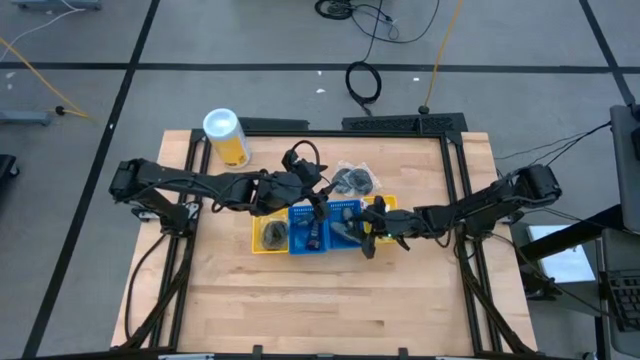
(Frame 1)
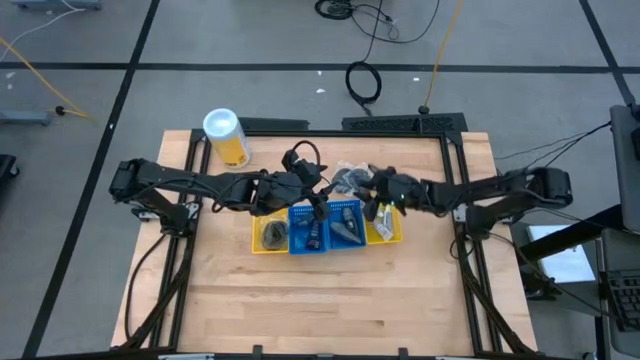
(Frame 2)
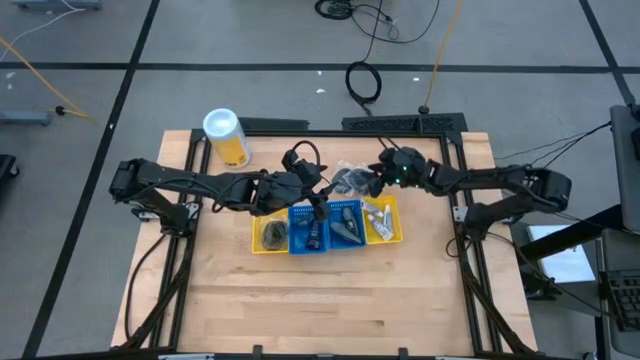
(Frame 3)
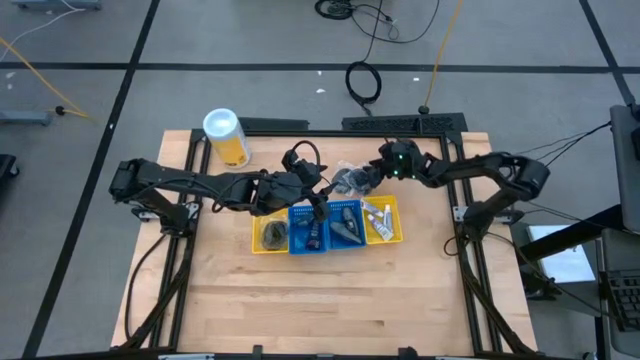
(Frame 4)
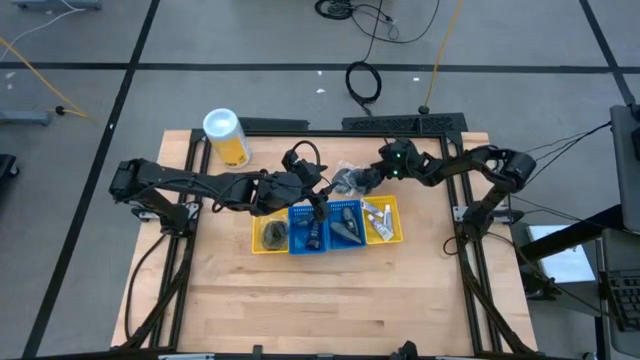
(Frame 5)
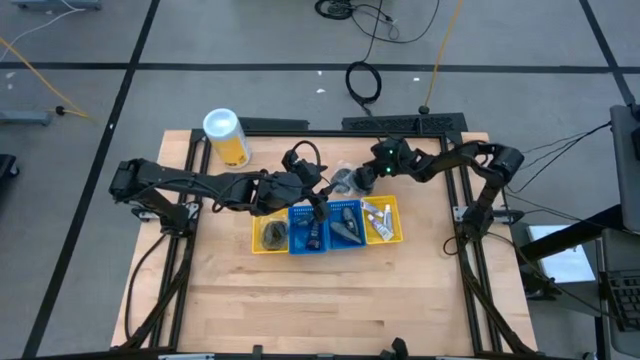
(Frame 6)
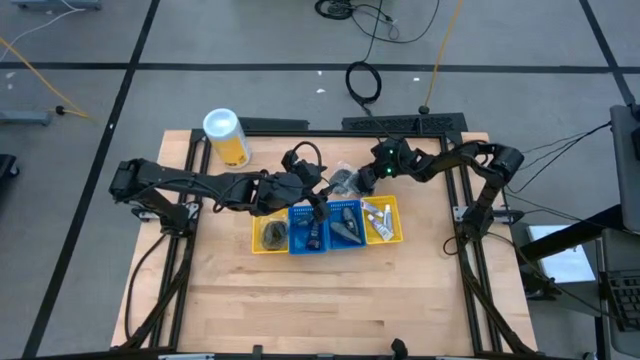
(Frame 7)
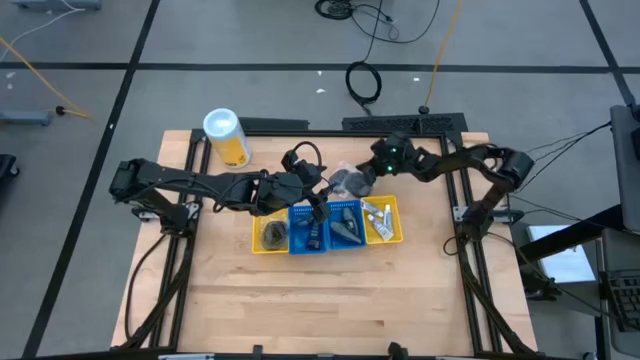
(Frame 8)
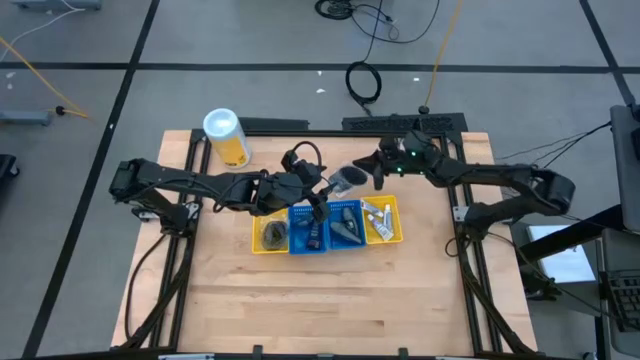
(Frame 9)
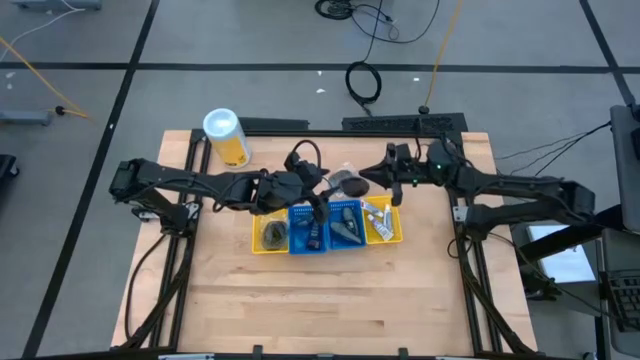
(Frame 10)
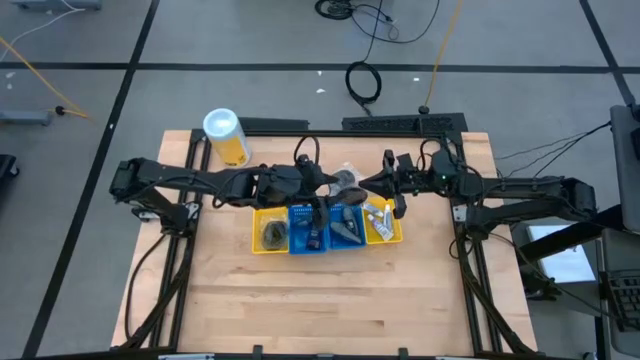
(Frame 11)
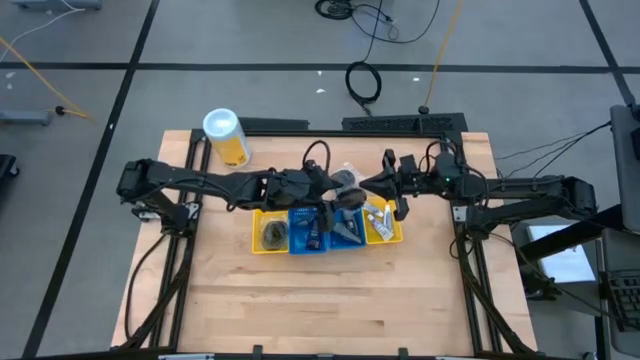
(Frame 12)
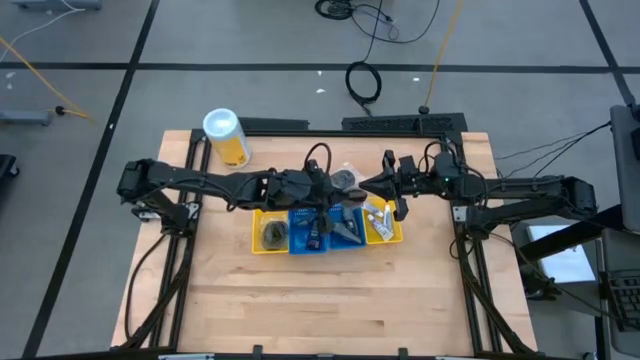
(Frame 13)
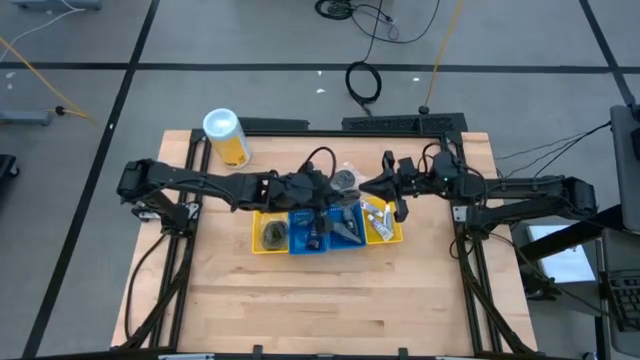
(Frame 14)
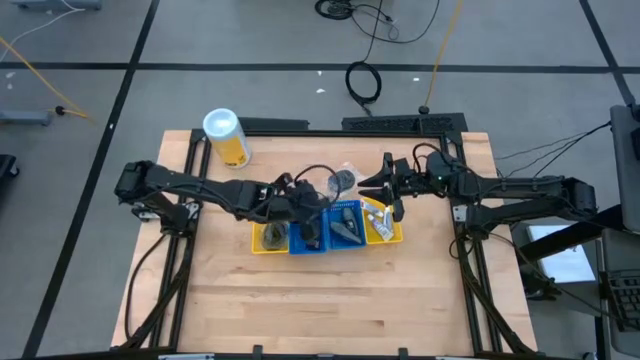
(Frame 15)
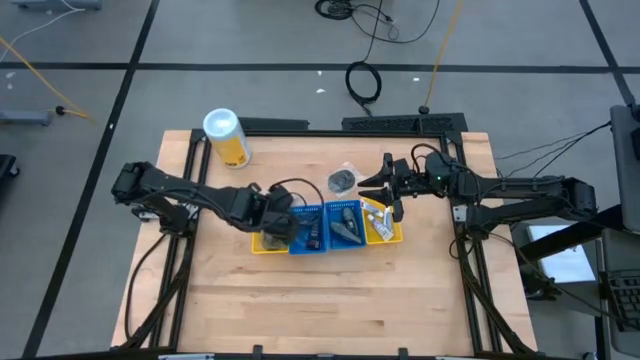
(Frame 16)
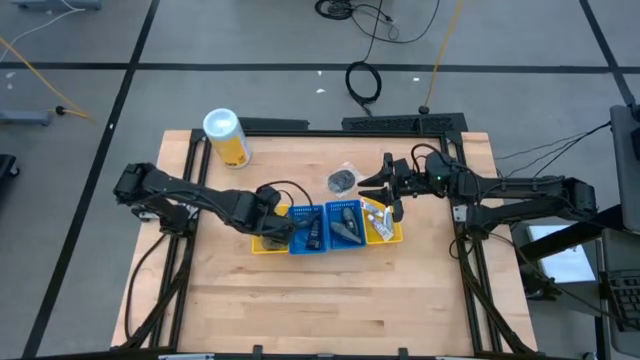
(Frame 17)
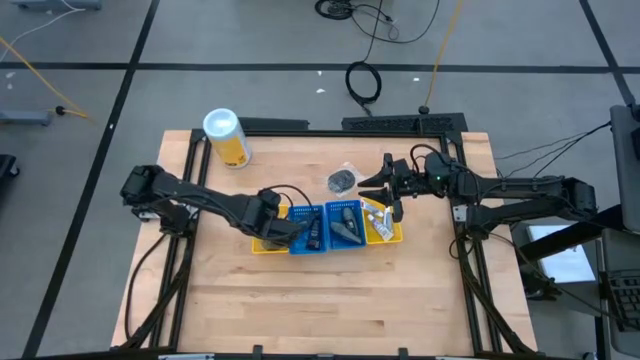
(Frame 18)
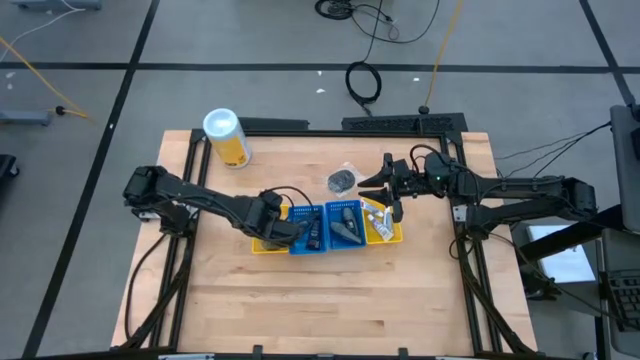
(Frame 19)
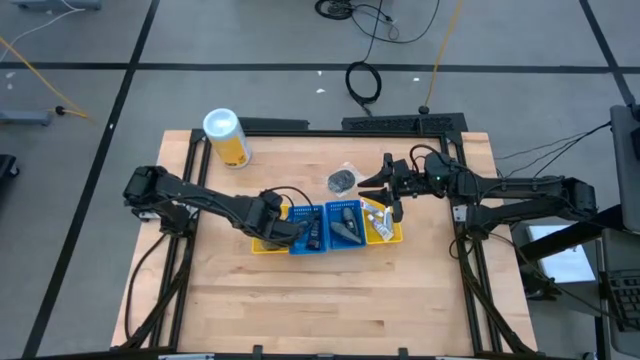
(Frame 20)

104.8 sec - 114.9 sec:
Task: Pick & Place Travel size toiletries
Put the hairbrush into the left yellow bin

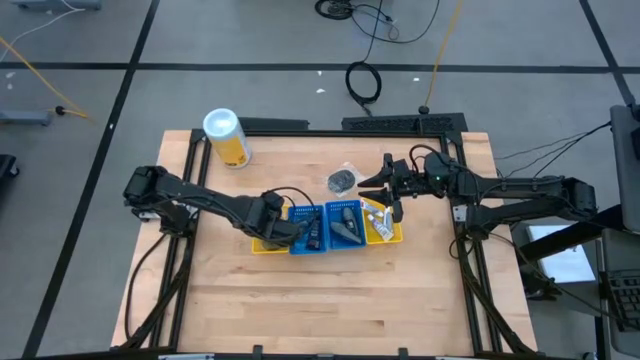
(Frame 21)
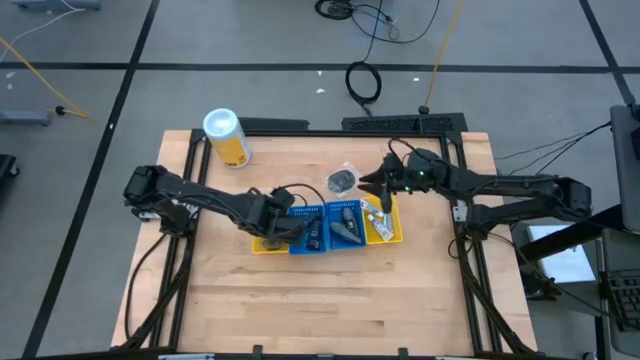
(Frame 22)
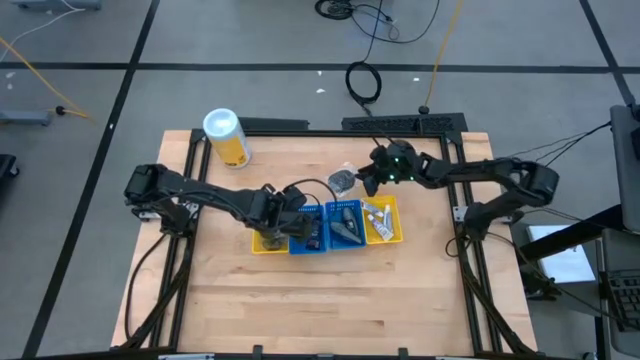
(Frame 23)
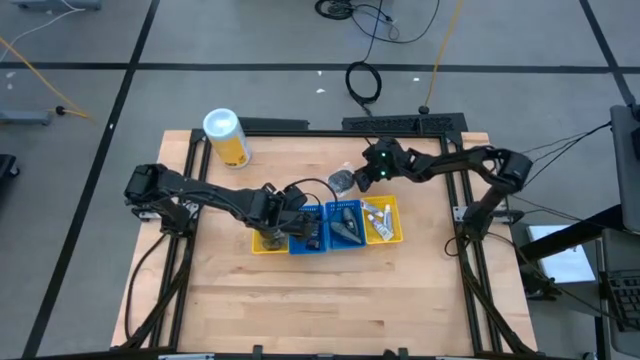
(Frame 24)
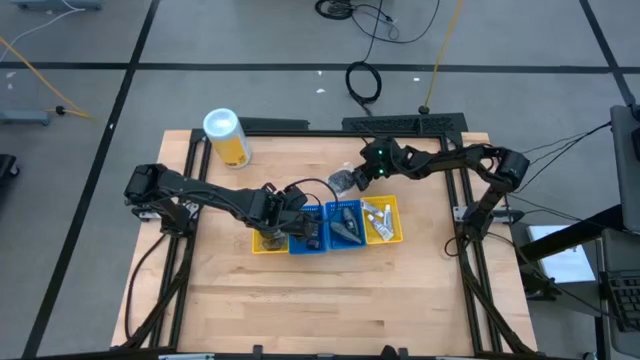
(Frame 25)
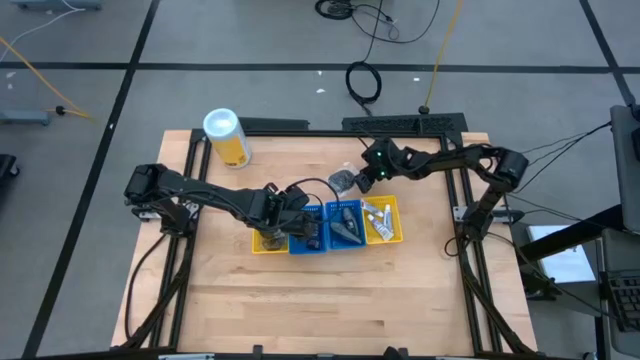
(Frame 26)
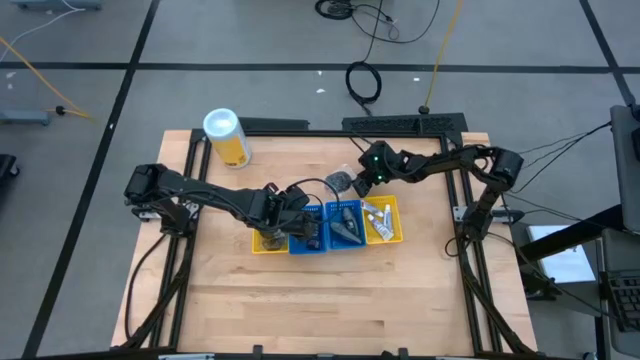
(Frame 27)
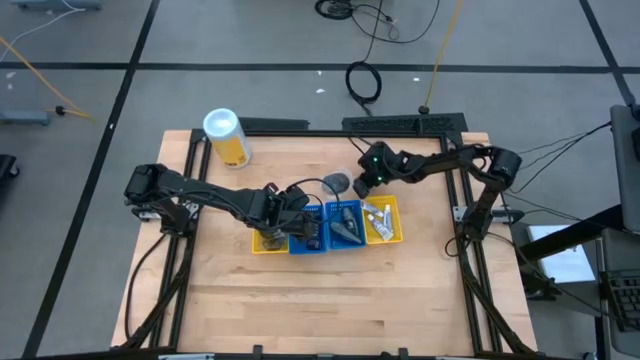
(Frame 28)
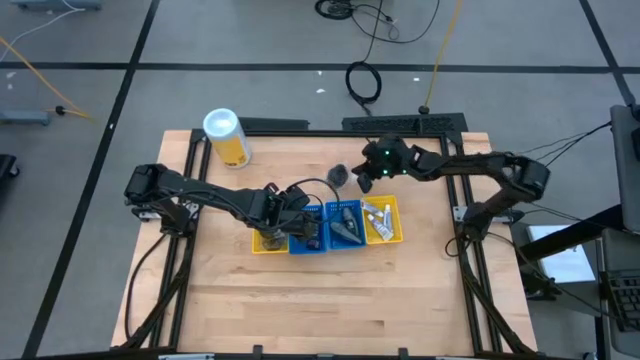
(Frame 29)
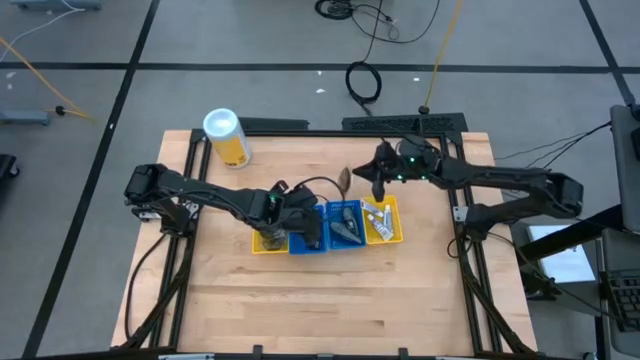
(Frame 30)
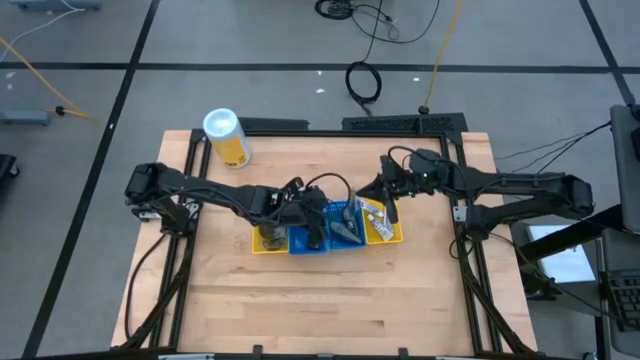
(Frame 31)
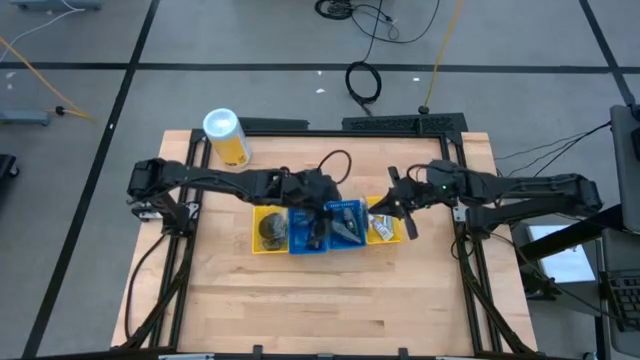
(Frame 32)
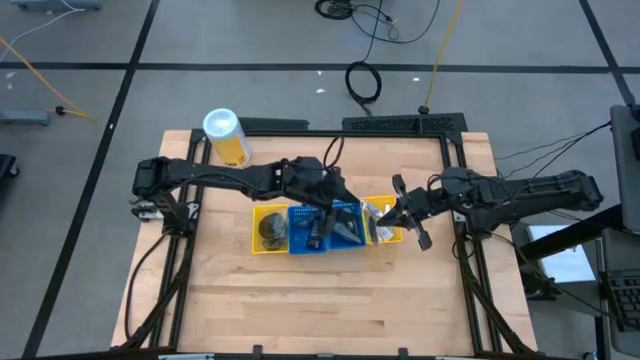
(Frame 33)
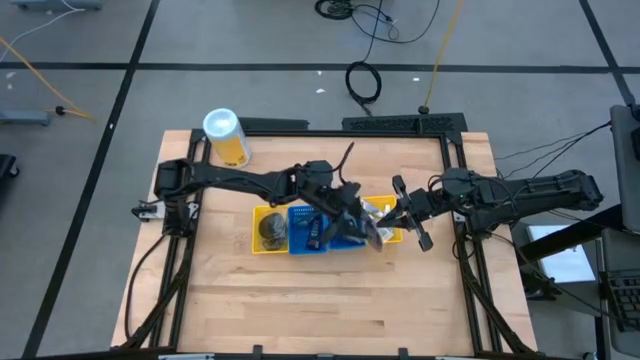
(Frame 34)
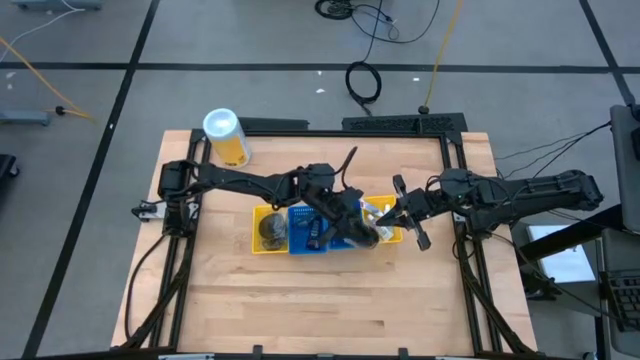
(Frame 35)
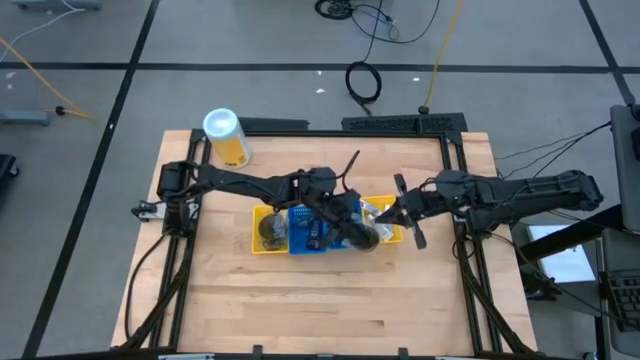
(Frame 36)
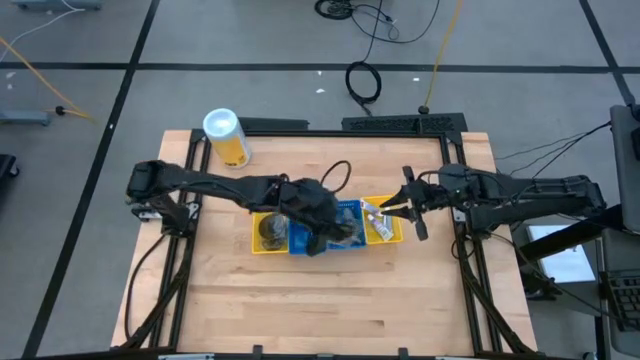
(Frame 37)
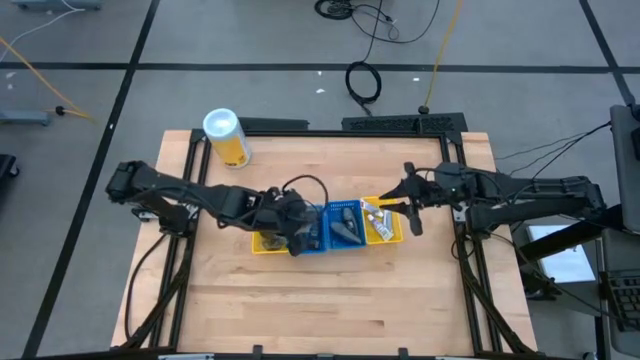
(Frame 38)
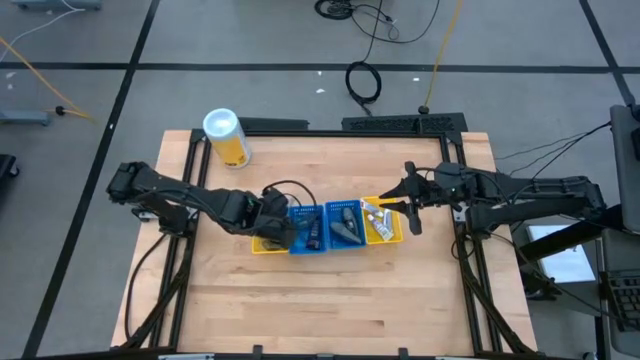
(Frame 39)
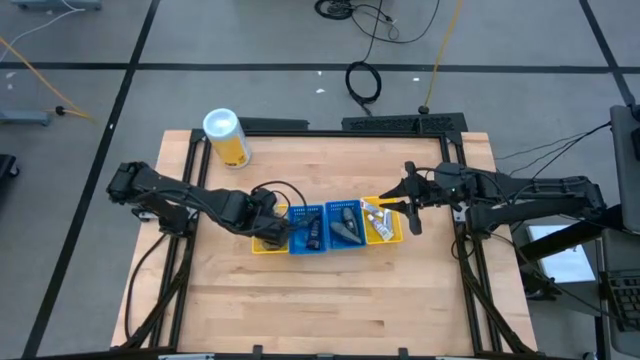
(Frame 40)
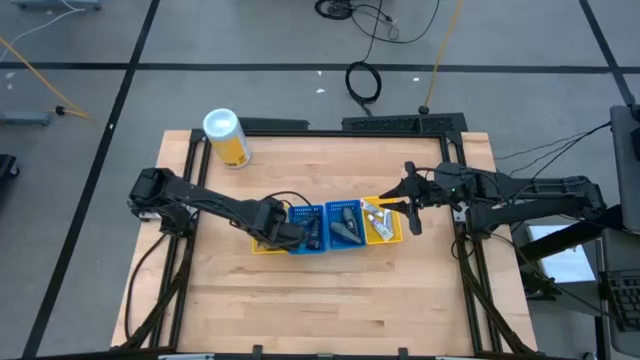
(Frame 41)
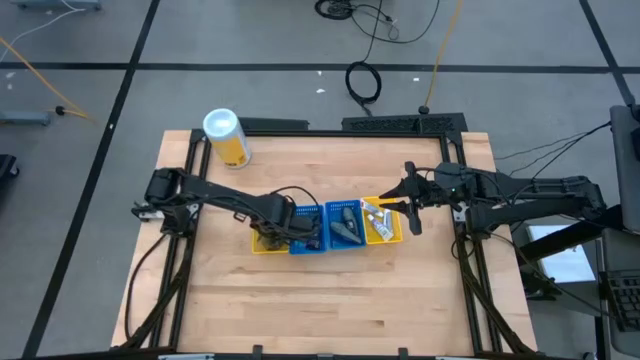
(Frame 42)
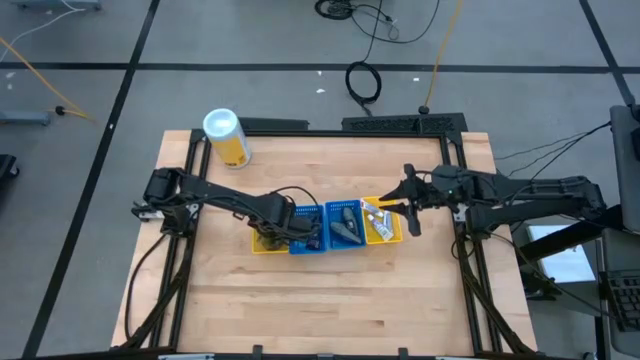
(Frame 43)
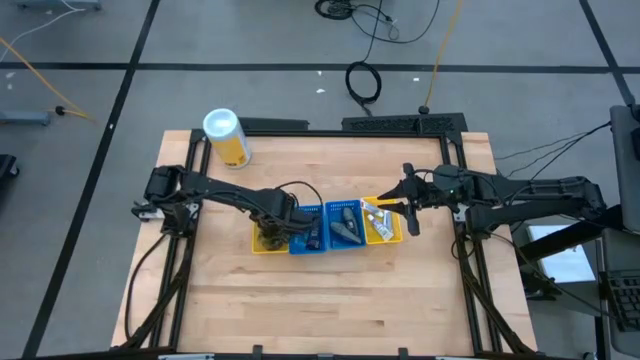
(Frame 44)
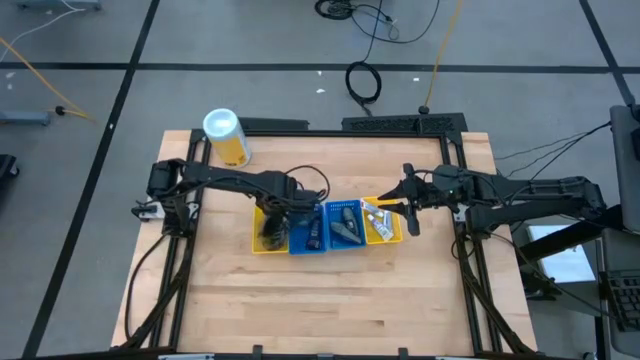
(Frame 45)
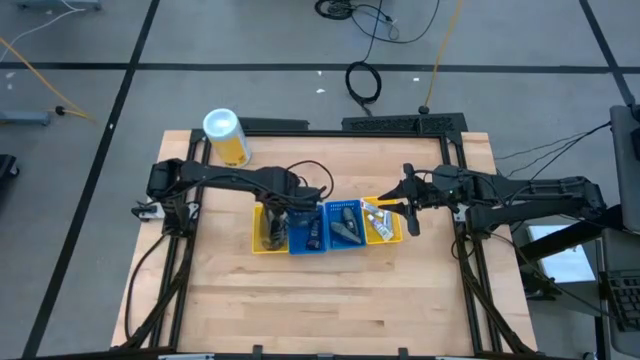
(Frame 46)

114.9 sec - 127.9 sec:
Put the hairbrush into the left yellow bin
